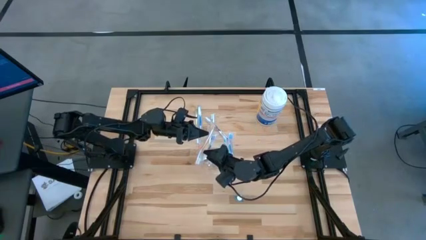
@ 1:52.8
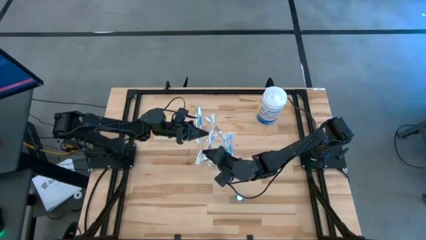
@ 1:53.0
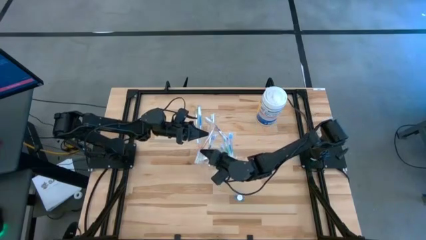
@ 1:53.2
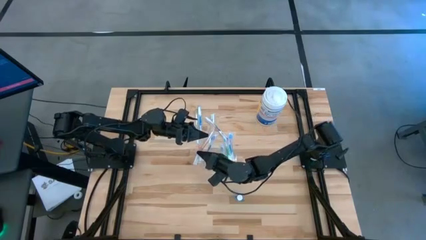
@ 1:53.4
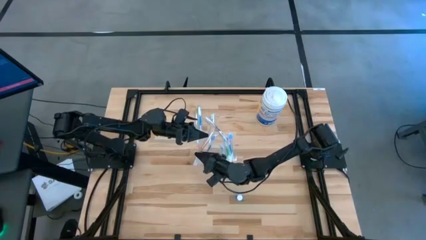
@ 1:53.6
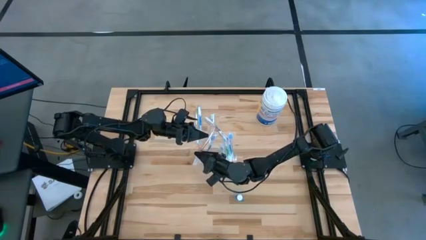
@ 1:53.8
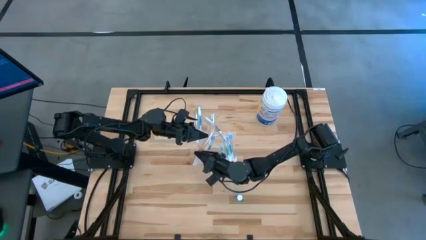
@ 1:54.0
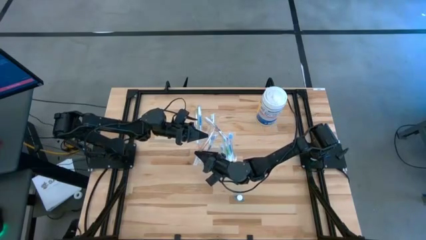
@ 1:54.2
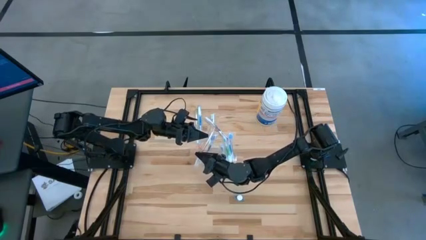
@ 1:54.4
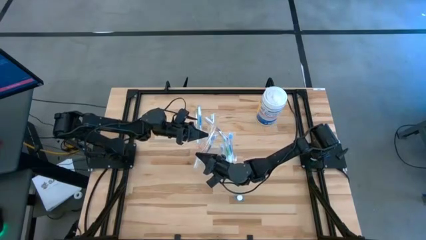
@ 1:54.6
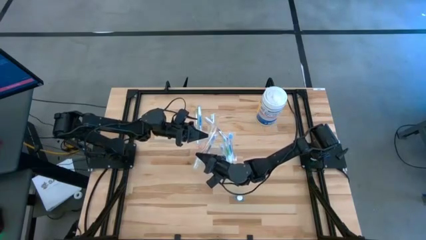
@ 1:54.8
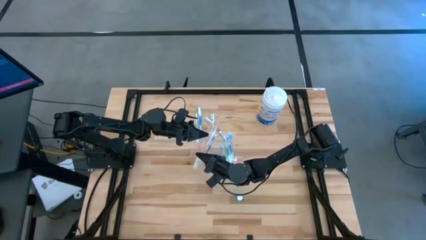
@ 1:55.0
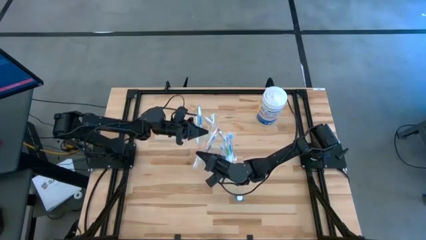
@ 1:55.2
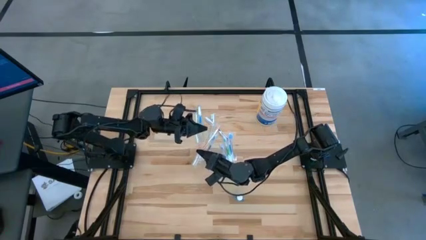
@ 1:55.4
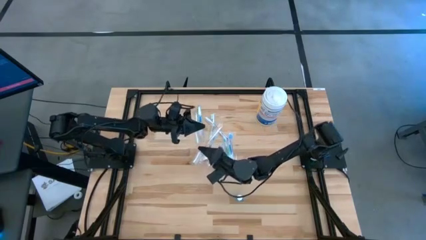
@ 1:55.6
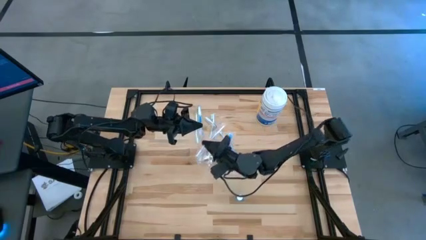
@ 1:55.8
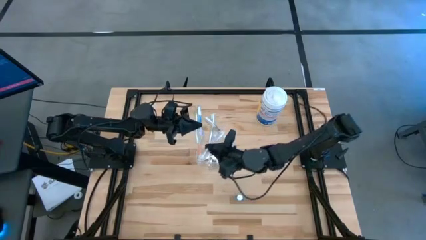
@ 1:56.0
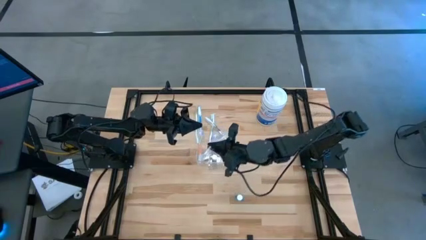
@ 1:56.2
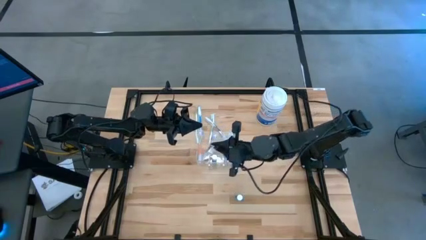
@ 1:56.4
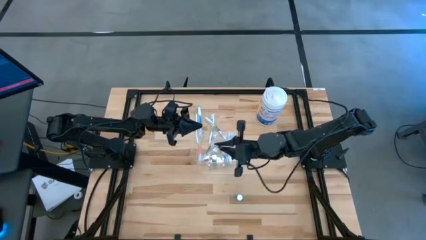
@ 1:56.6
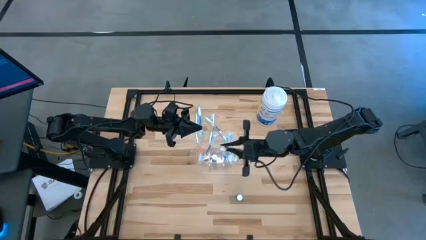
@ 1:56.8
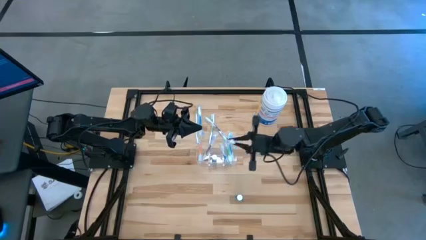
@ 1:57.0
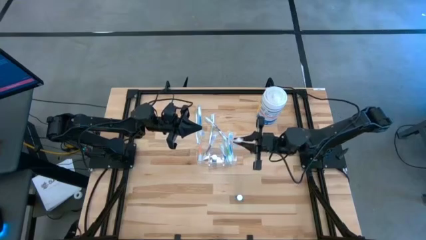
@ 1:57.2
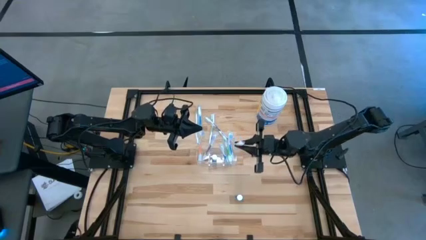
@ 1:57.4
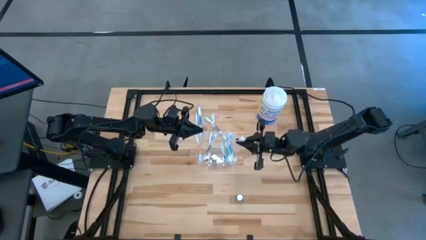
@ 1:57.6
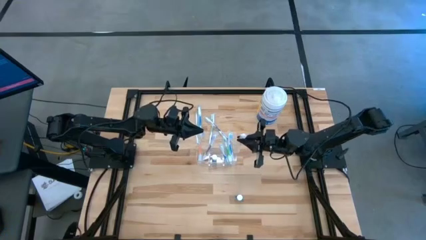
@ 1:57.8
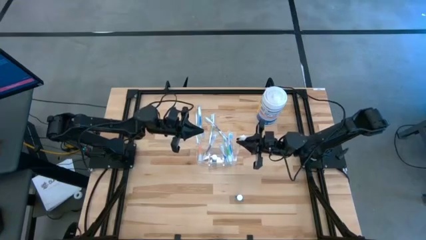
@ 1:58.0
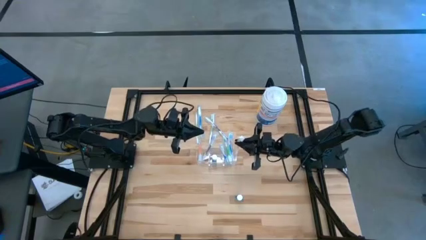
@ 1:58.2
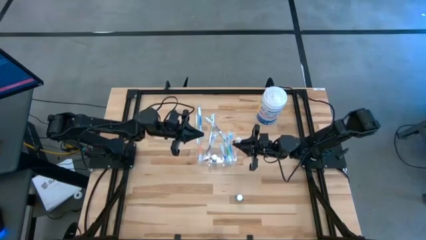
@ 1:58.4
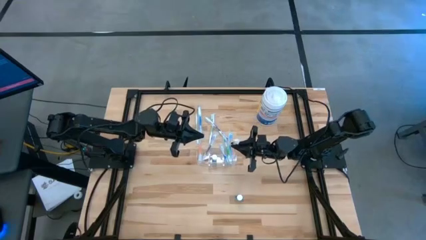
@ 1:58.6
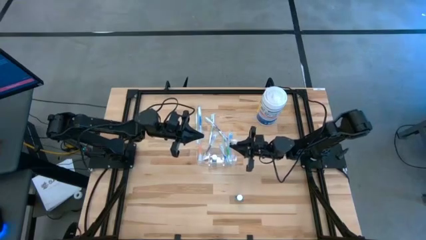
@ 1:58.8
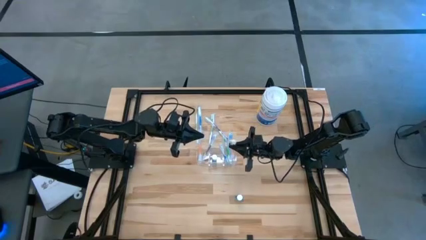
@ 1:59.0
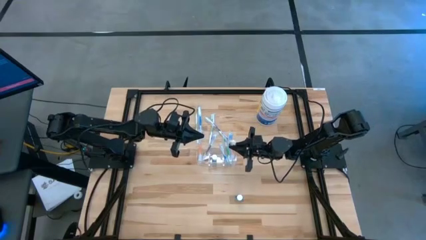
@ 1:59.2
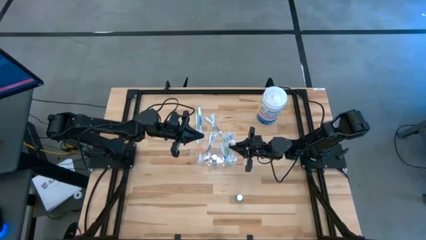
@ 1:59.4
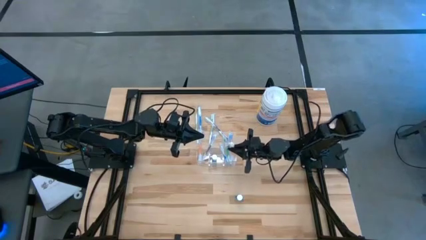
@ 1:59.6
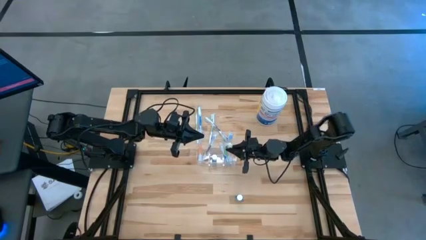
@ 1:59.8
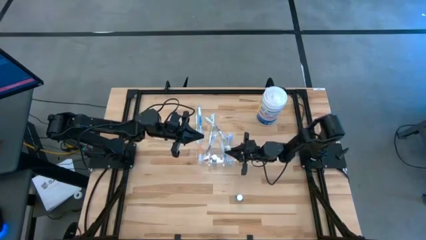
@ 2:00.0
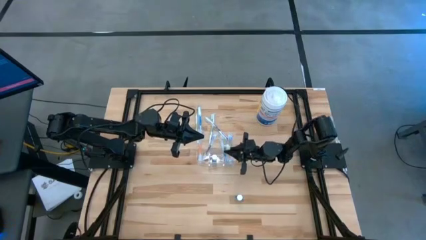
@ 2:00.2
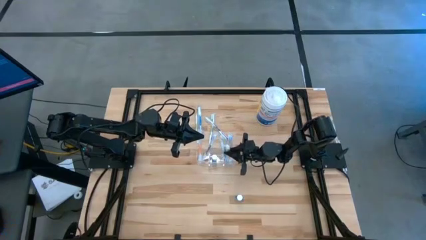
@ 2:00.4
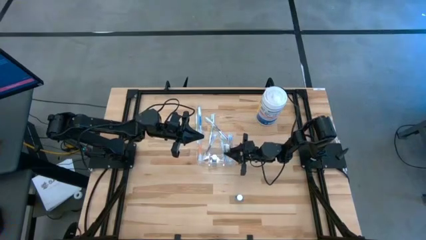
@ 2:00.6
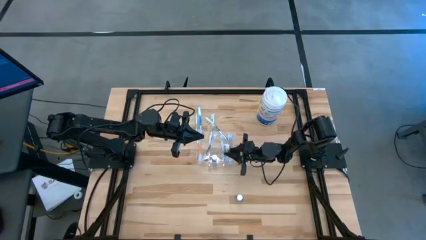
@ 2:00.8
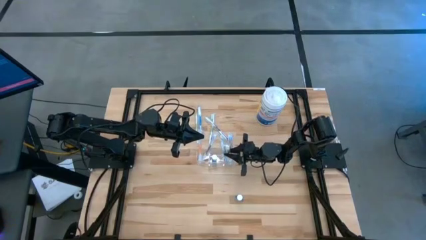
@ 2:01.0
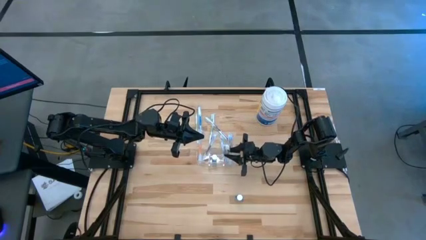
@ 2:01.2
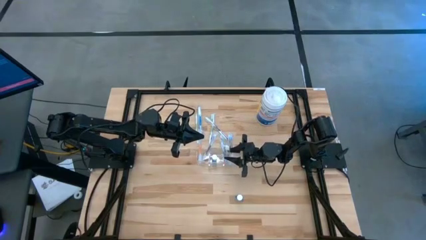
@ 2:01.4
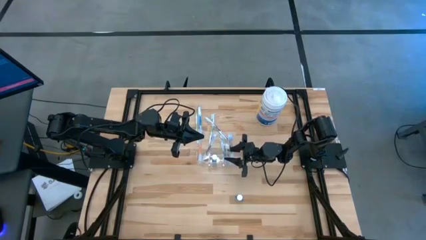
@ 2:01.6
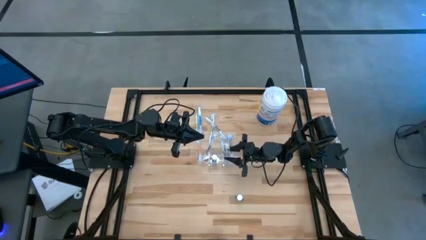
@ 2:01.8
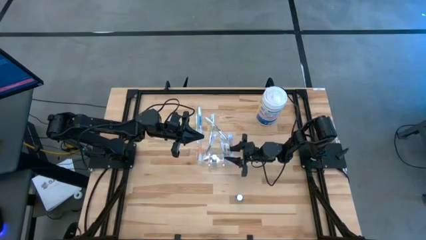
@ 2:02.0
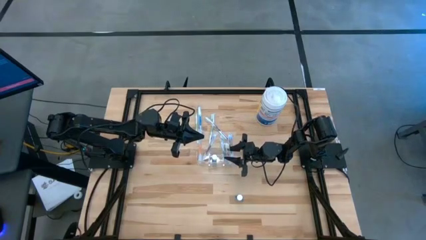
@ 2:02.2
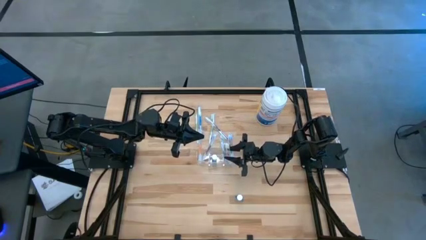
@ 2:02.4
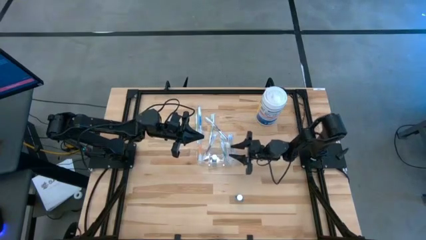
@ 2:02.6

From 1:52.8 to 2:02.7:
Task: Pick & Place toothbrushing station
Put the orange toothbrush into the transparent organizer

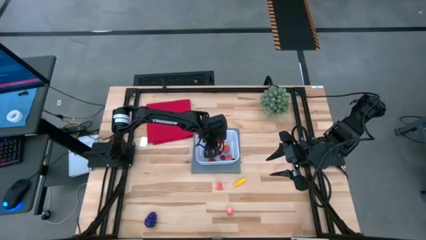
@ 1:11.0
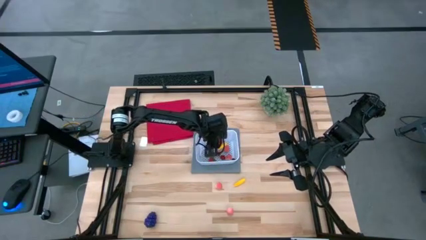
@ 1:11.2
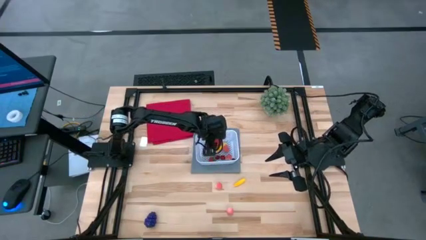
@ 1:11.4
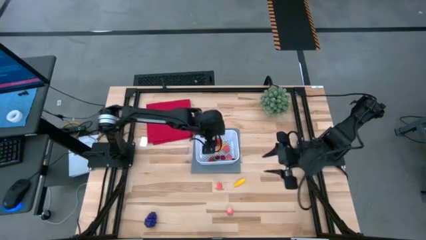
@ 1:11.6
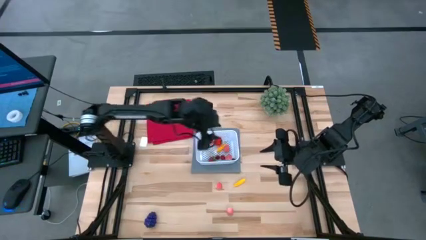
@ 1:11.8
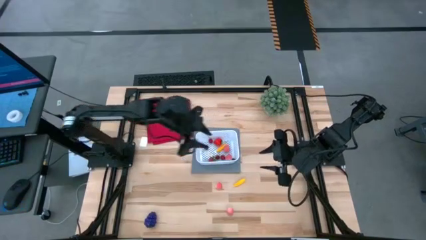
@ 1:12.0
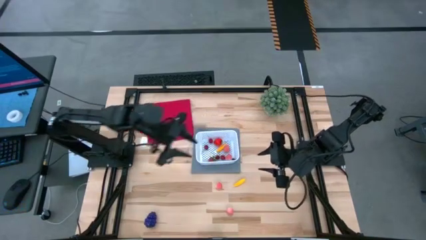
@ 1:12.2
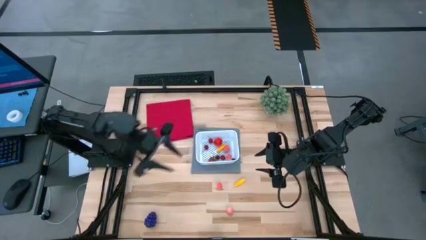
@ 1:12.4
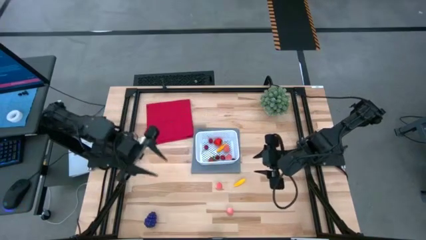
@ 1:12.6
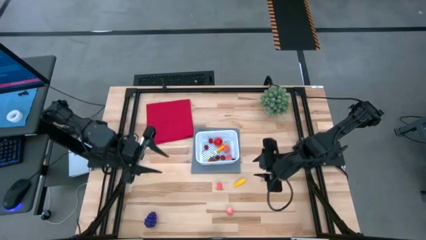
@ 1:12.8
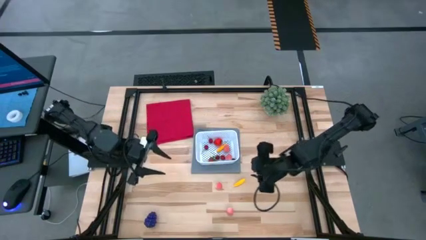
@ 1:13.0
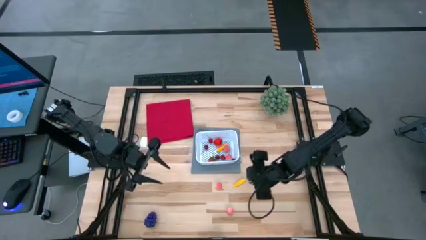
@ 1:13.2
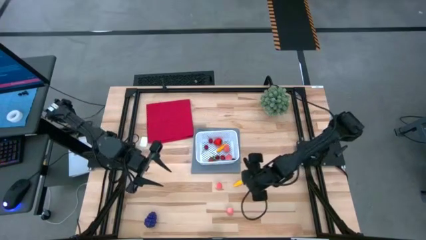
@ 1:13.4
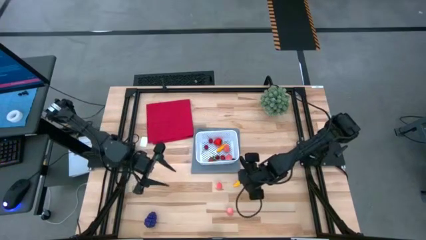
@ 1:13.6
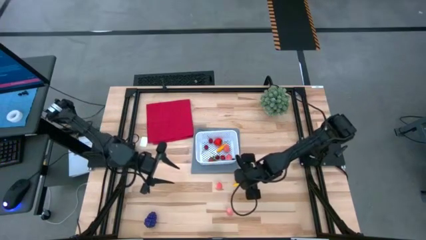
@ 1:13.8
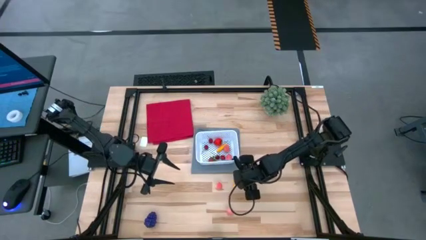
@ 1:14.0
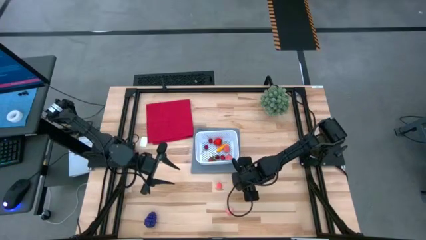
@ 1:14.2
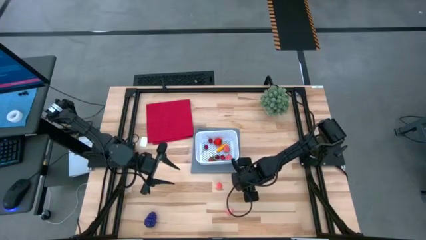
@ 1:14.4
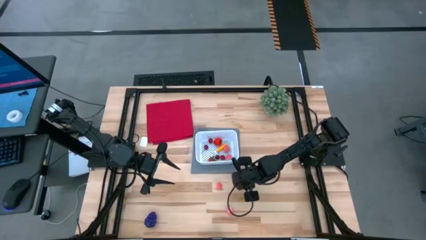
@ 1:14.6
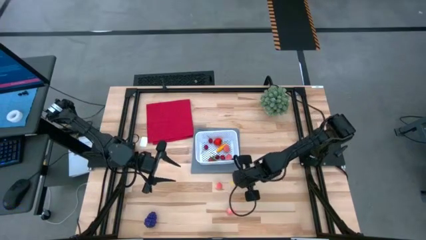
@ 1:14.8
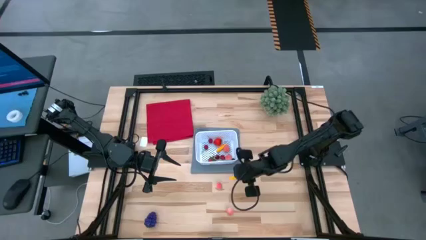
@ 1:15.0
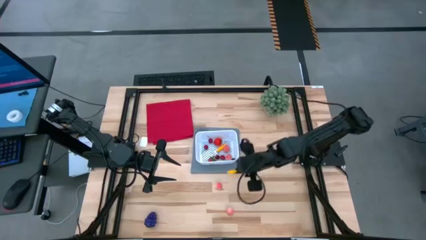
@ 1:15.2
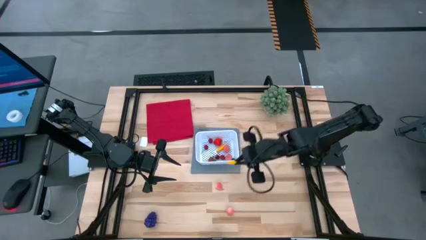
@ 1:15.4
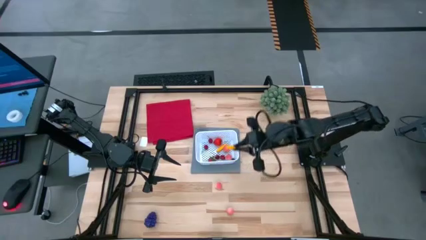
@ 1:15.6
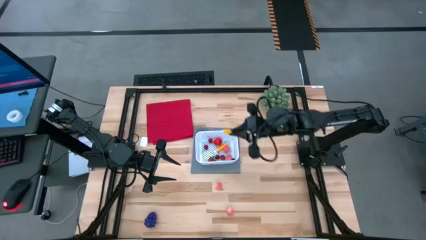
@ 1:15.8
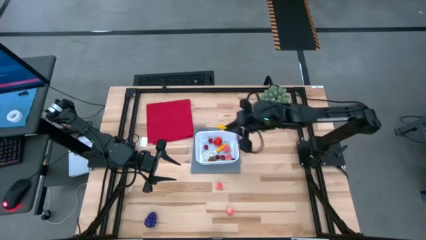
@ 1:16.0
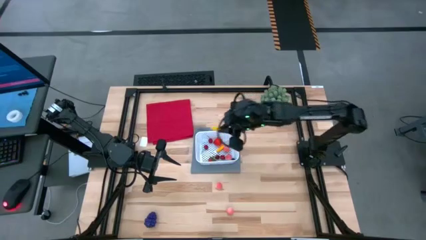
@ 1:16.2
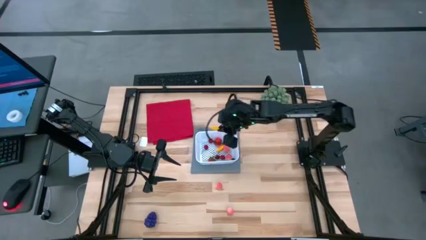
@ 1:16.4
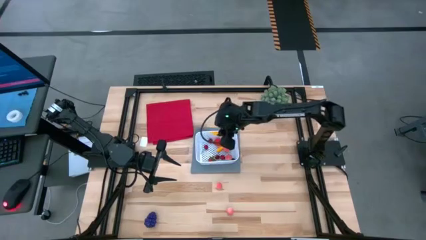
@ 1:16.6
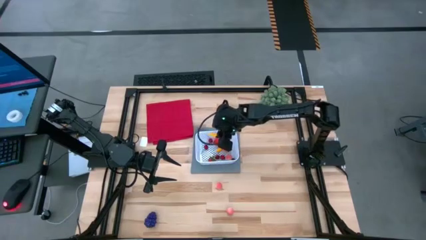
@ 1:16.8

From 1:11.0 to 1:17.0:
Task: Pick and placing Produce into tupperware
Put the corn into the white basket
